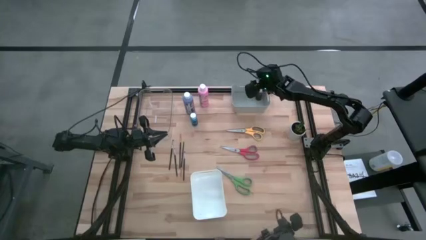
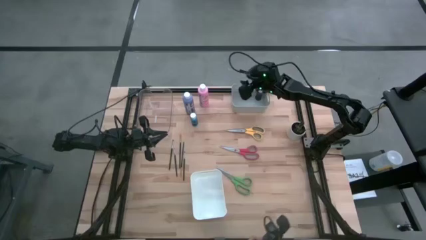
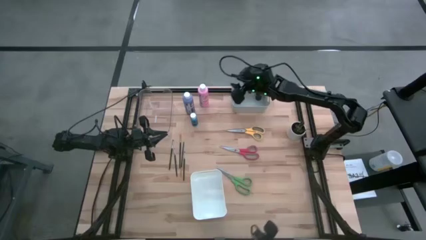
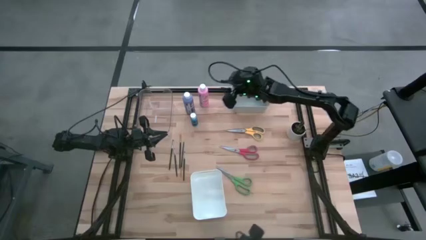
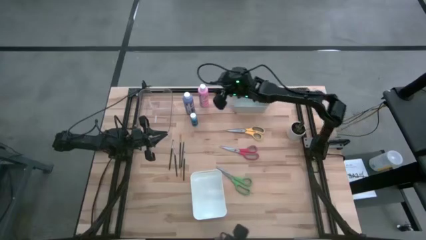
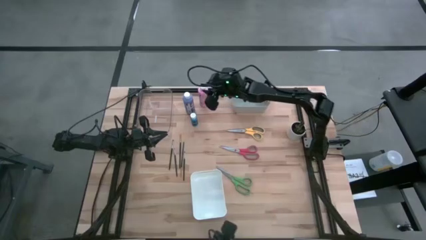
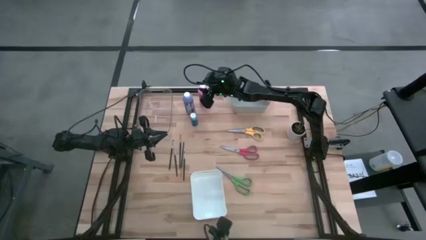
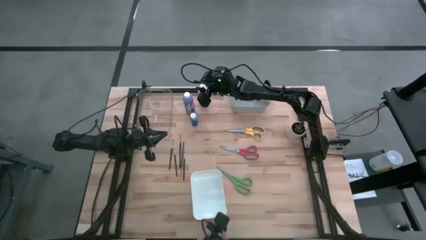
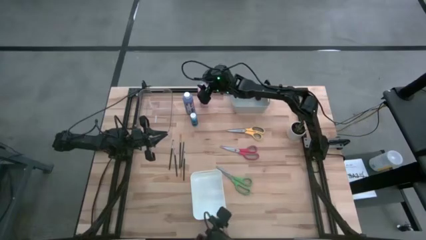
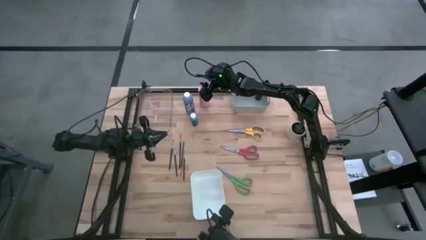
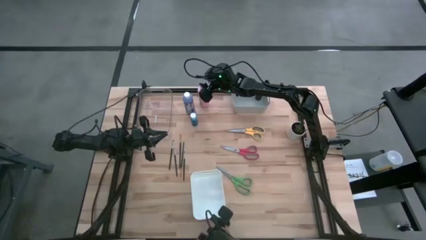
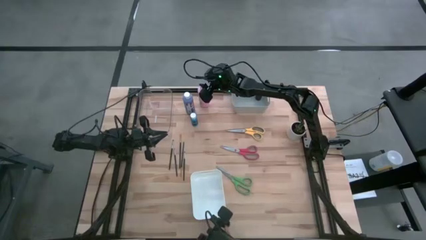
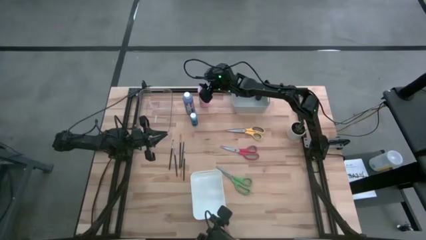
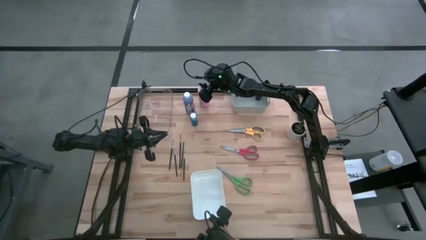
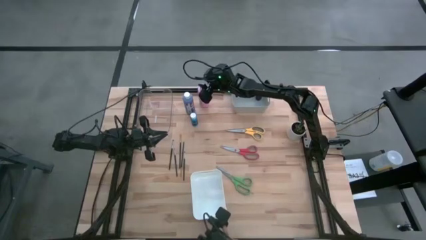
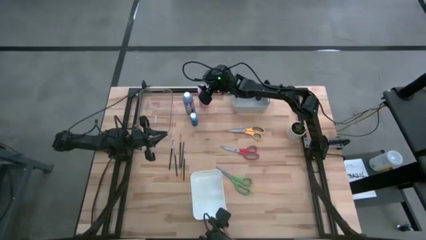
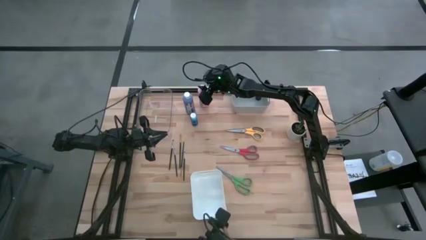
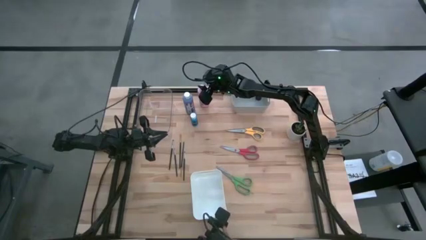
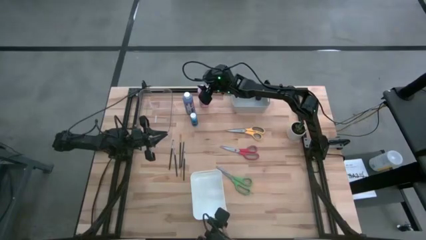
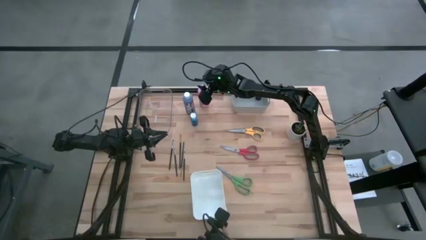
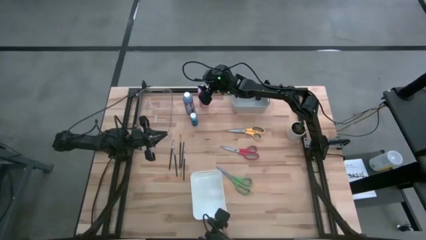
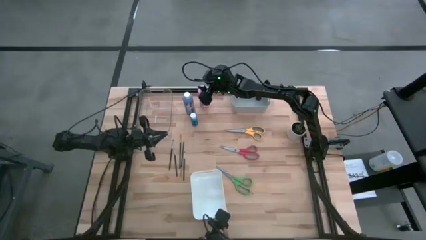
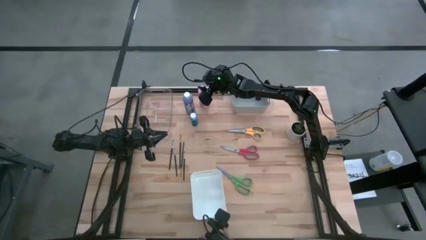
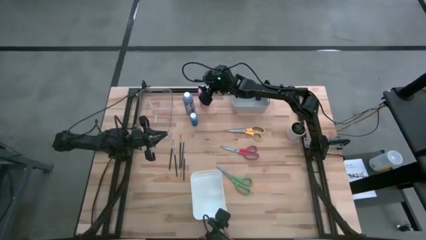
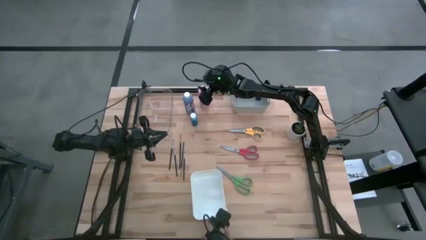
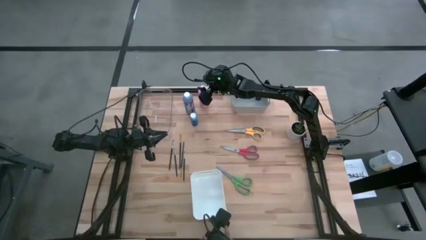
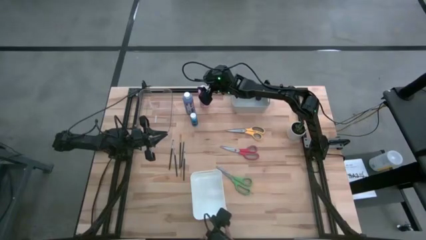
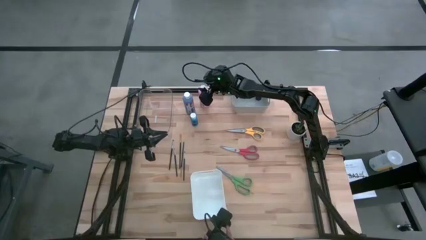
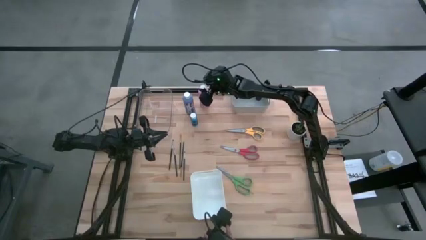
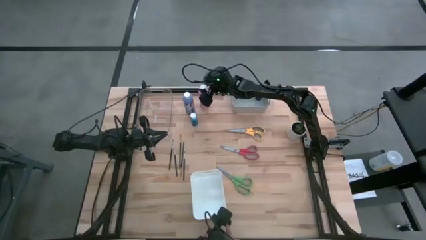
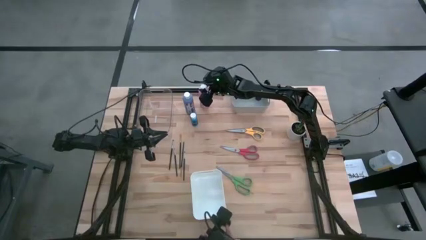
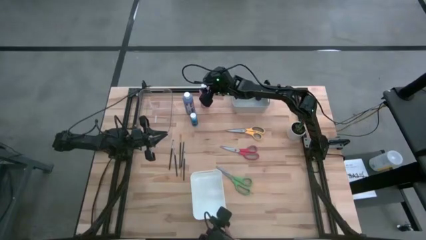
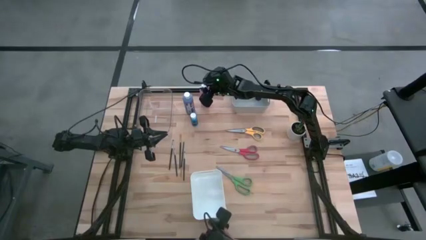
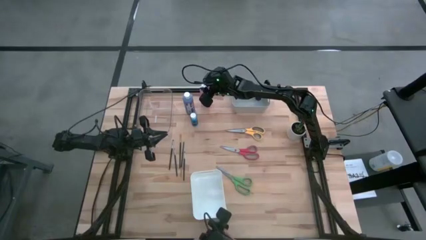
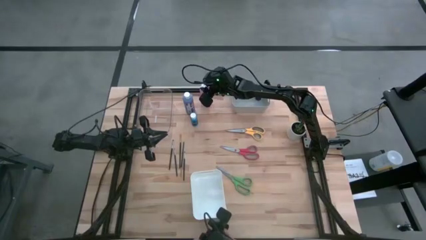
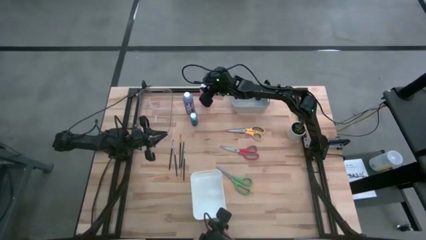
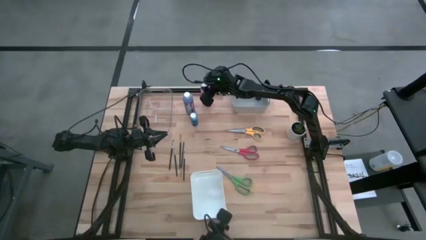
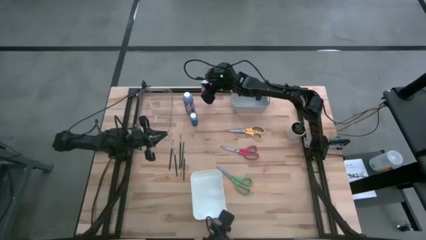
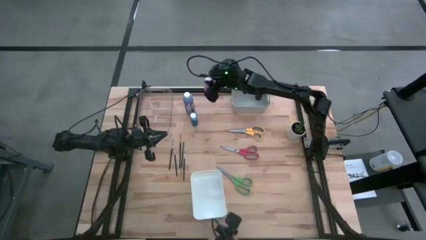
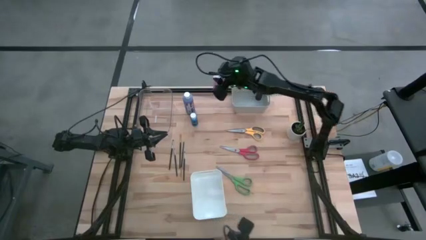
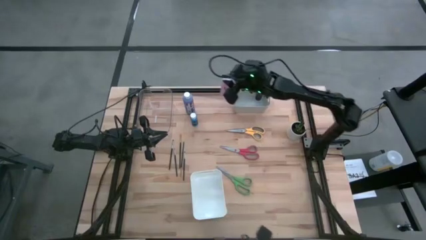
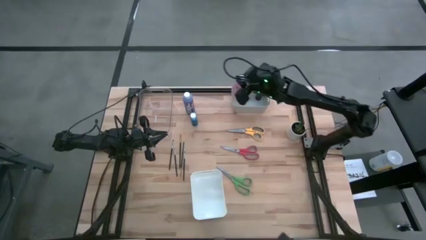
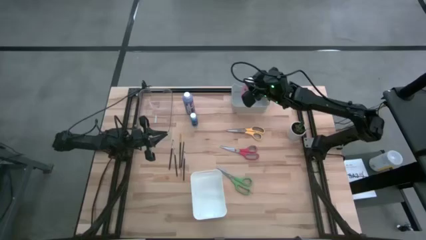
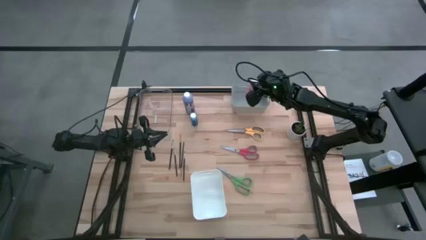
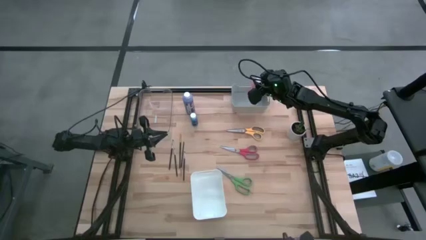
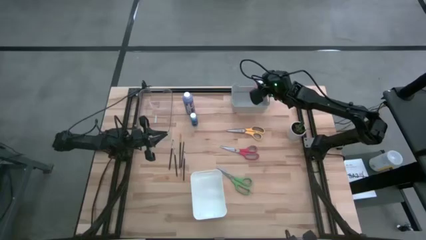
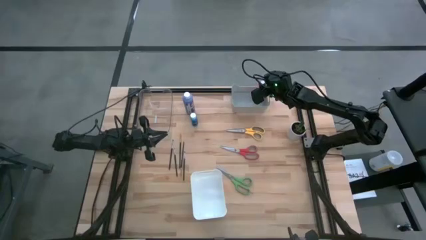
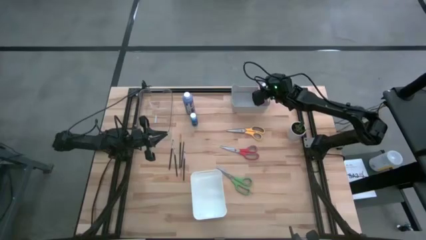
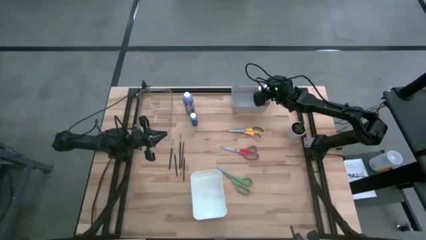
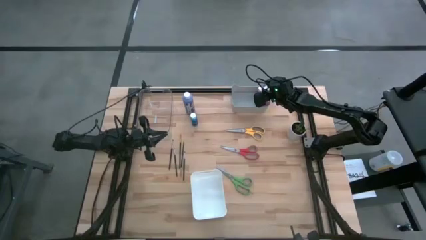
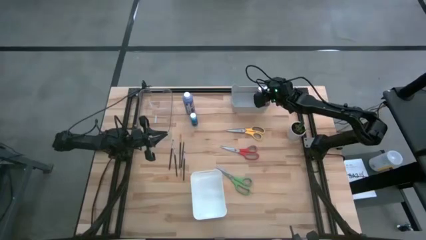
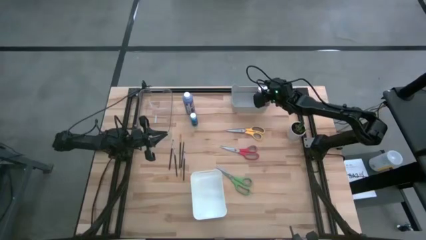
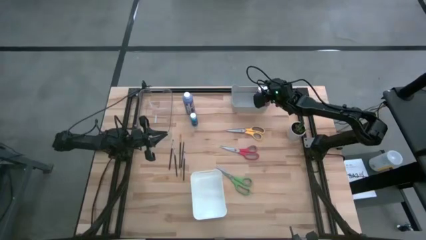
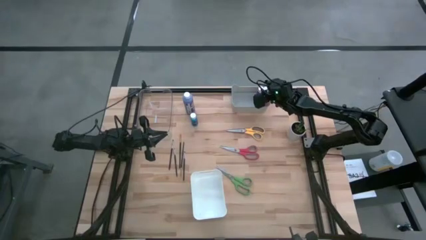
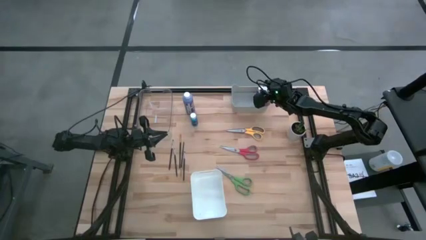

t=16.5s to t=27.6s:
Task: Pick & Place Paint Supplies
Put the large pink paint bottle into the gray bin

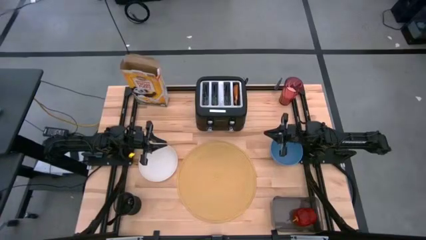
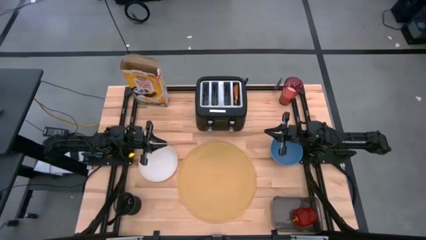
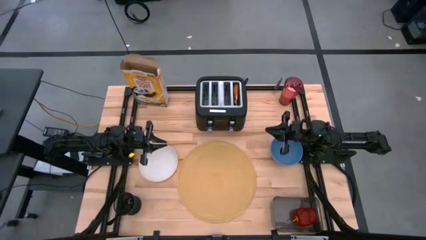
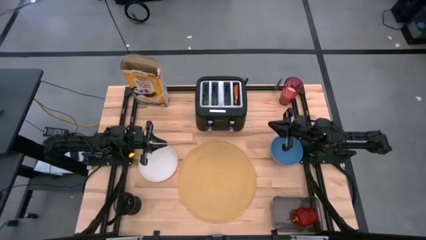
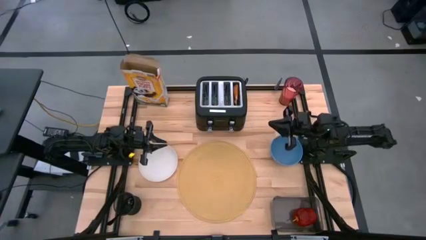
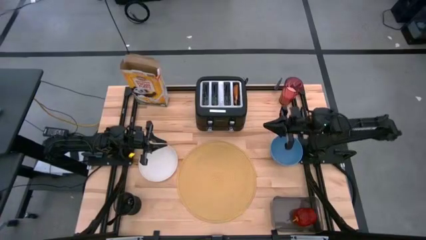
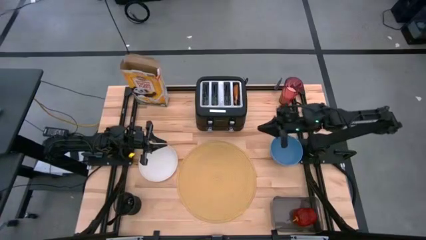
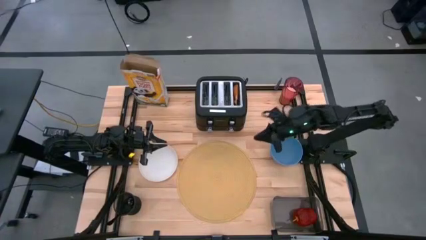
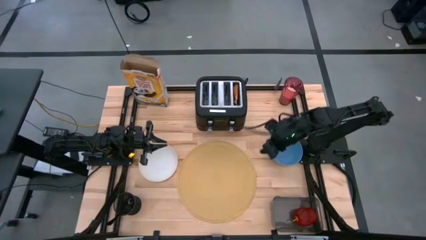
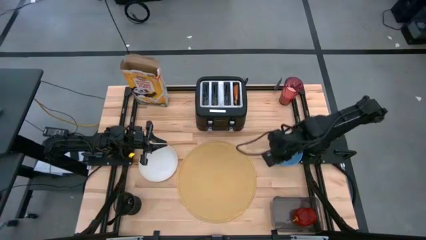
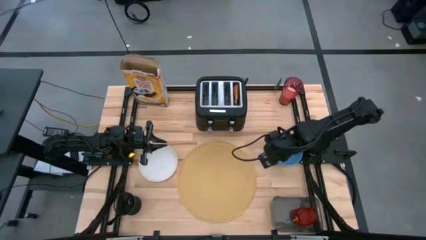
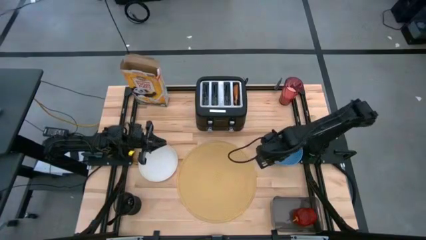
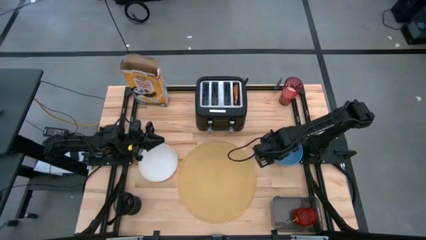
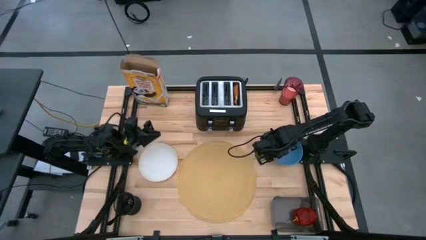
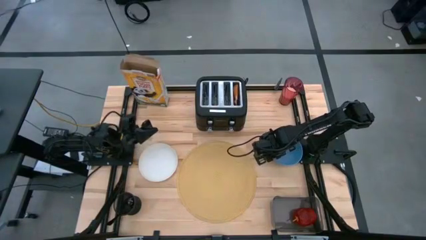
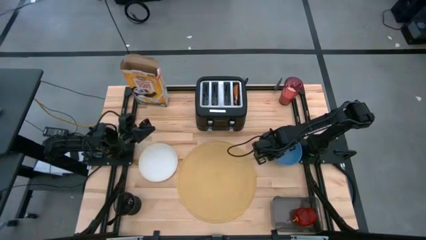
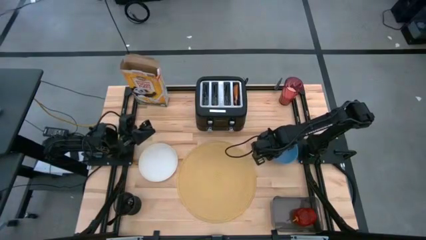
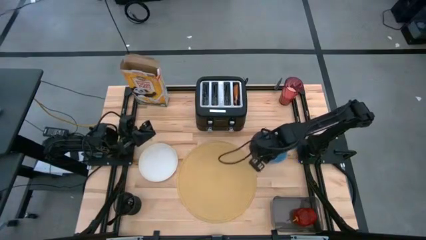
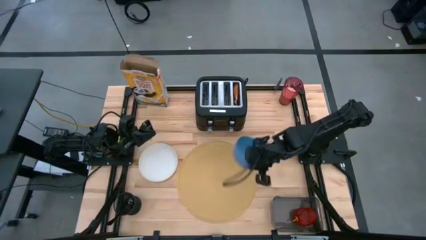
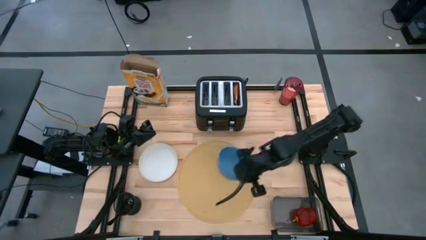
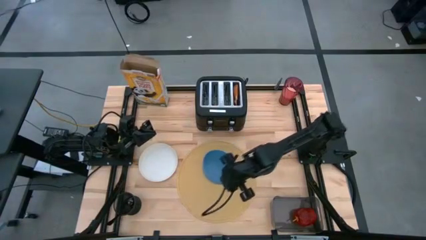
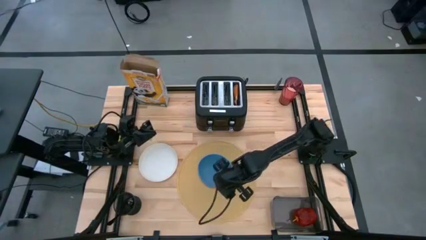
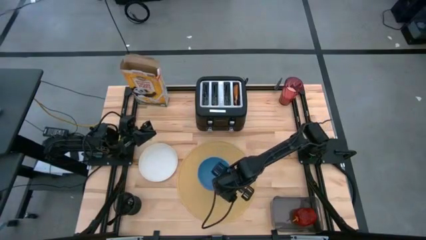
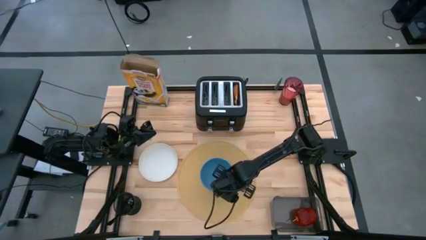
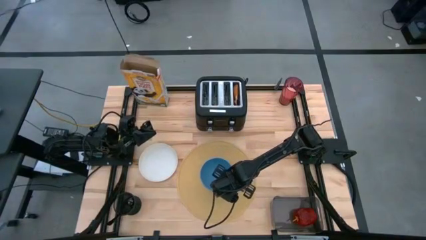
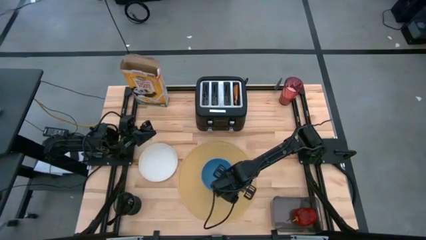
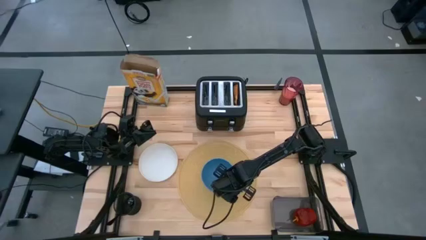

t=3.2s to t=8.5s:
Task: Arrange a breakfast setting
Put the bowl on the placemat

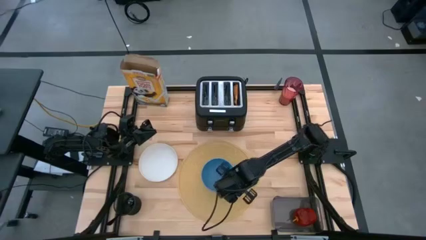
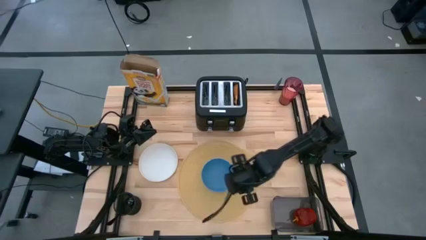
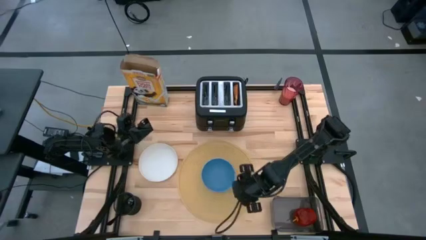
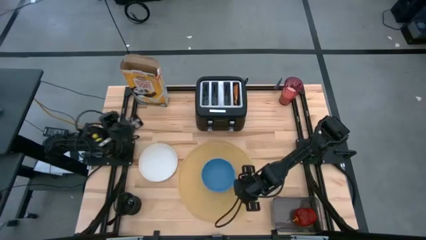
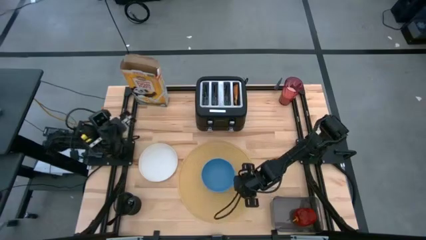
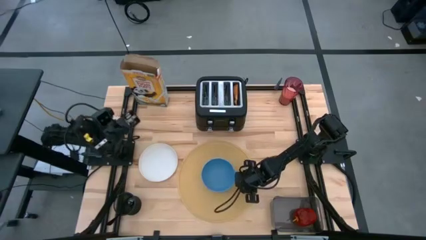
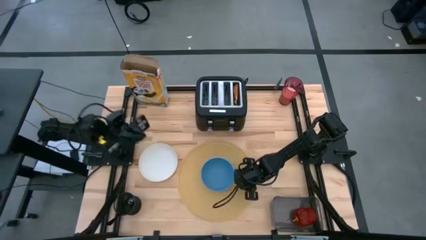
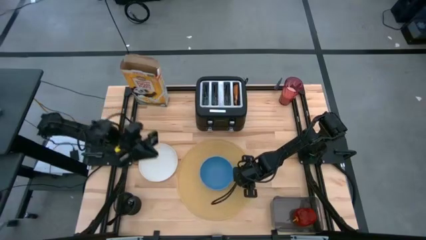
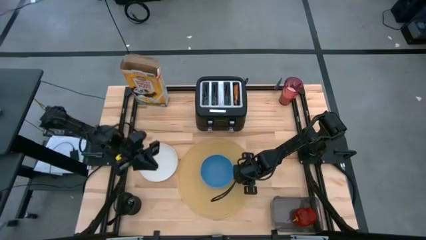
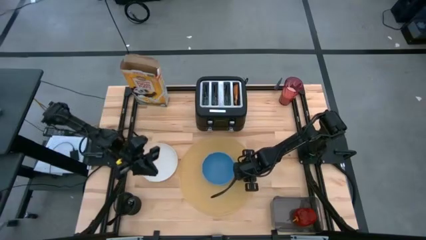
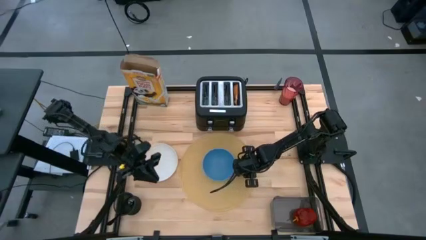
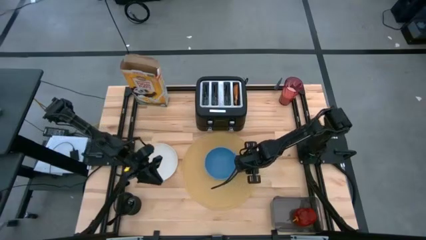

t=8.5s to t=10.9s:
Adjust the placemat
